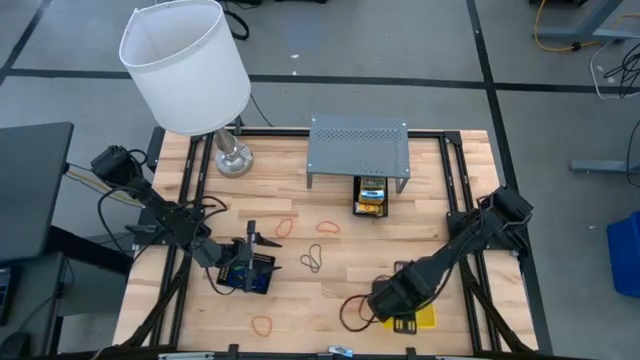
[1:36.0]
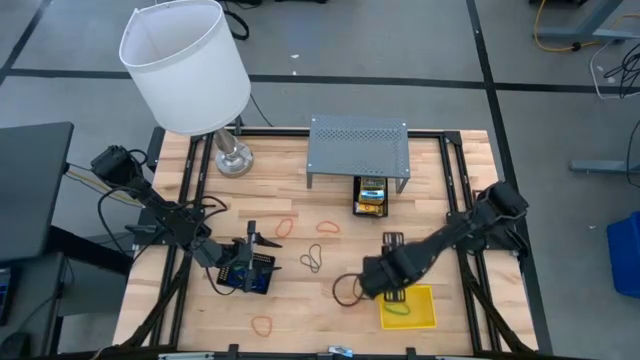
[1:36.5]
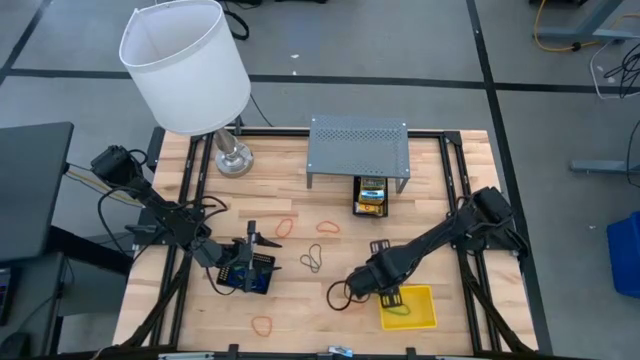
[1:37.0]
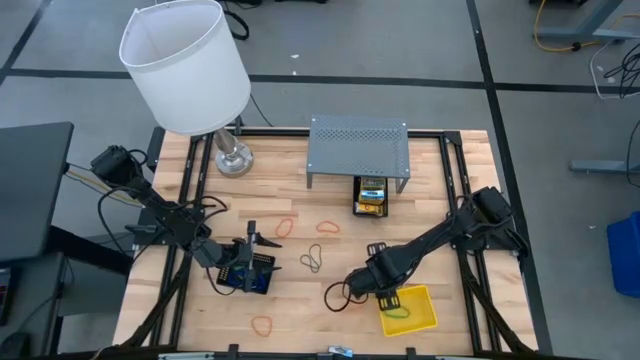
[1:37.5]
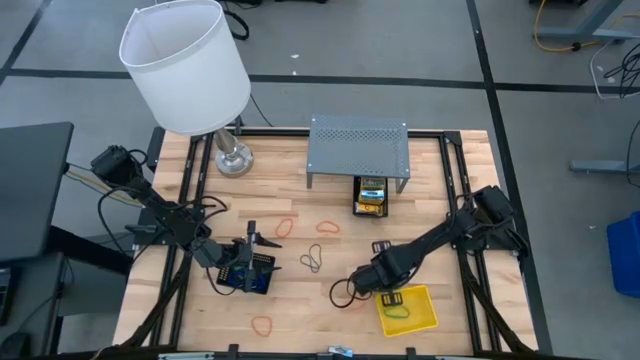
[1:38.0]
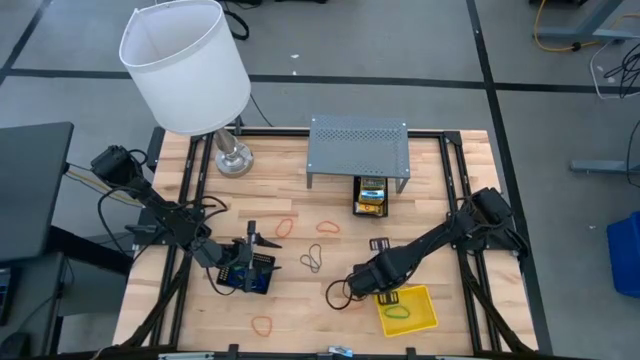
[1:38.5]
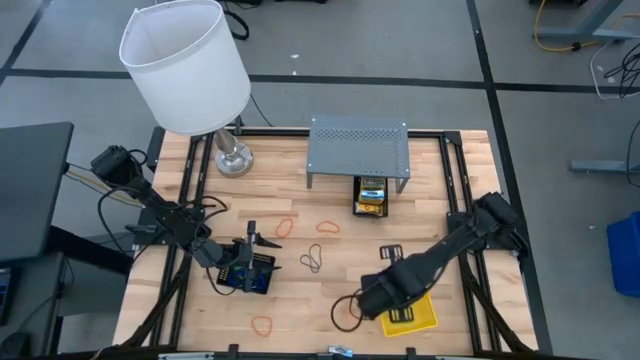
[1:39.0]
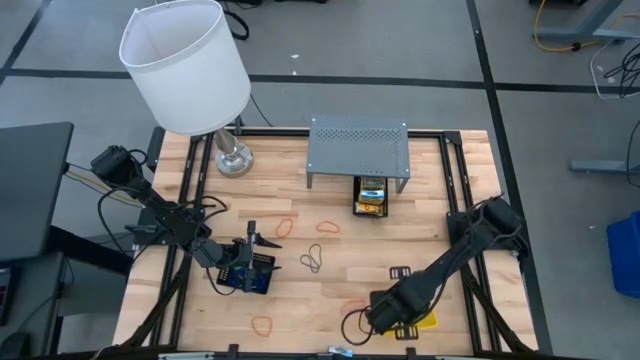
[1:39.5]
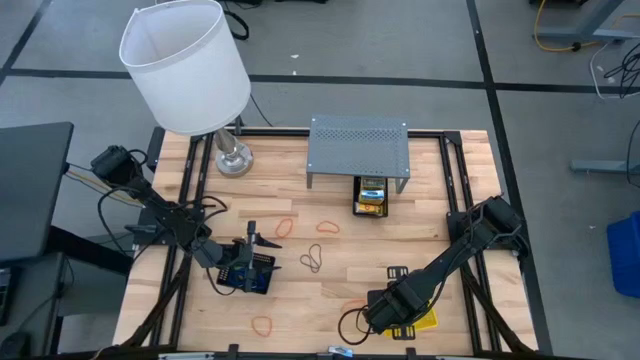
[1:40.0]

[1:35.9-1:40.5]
Task: Pick & Place Office Desk Supplies
Put the brown rubber band into the yellow bin

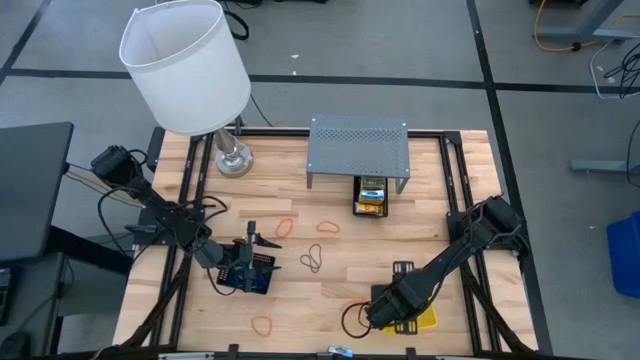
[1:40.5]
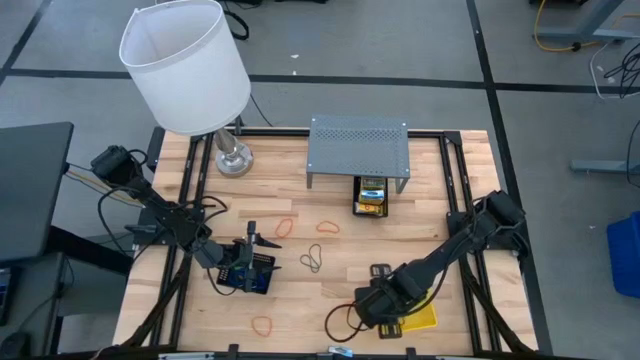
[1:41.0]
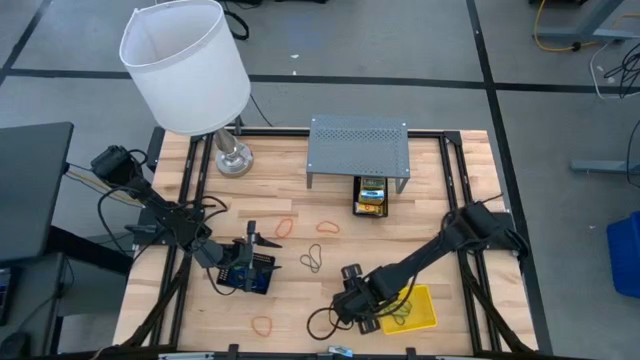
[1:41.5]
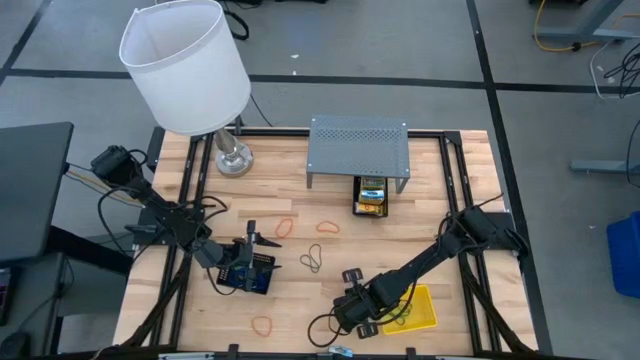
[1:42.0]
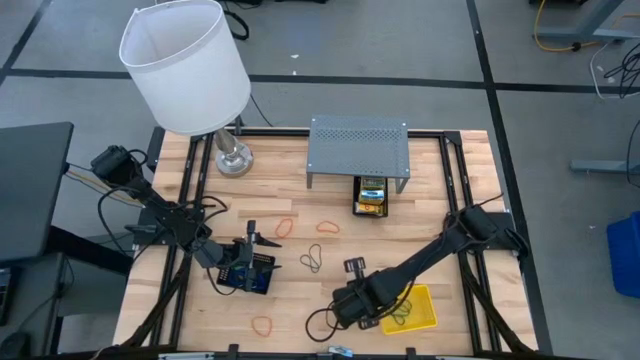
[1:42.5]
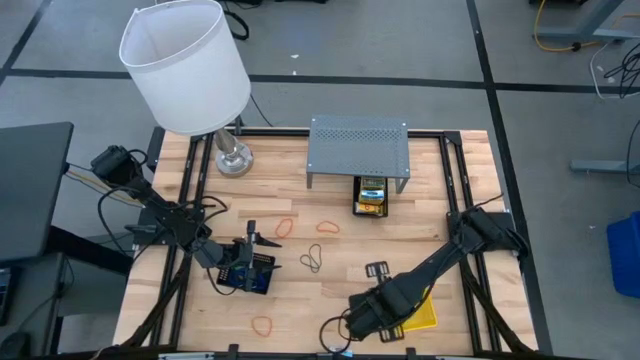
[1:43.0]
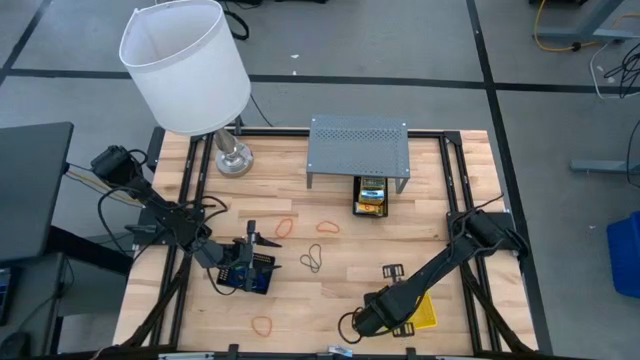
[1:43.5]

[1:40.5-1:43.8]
Put the orange rubber band into the yellow bin

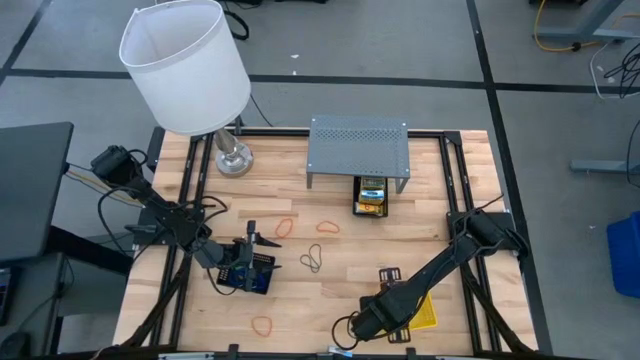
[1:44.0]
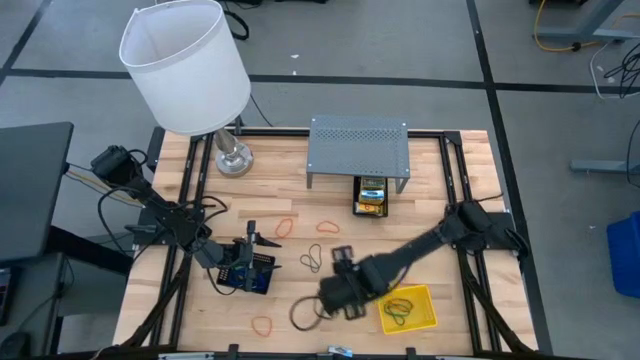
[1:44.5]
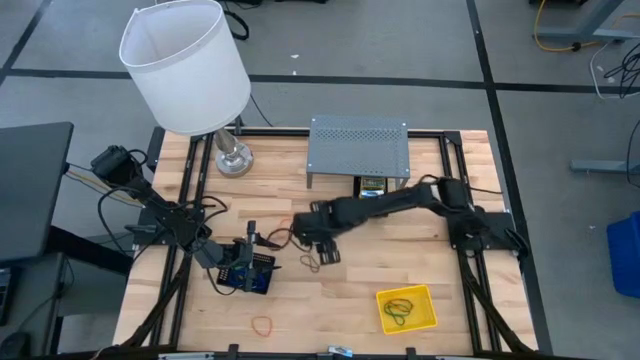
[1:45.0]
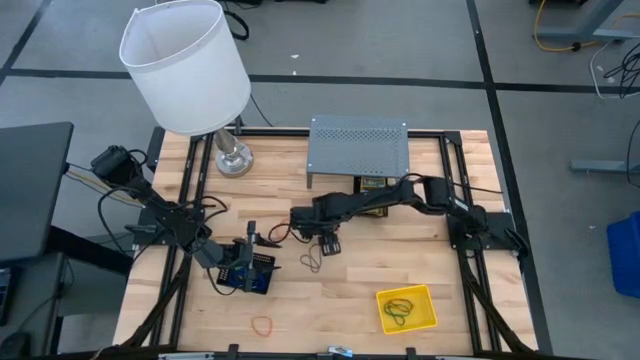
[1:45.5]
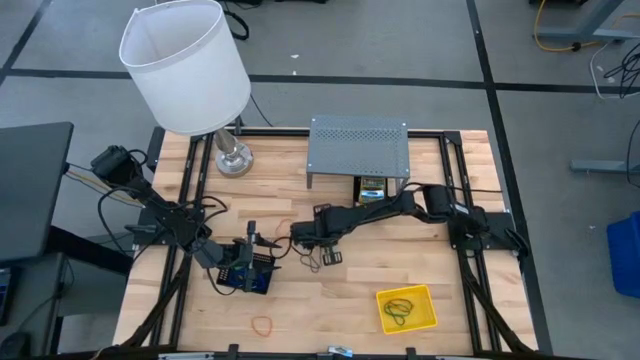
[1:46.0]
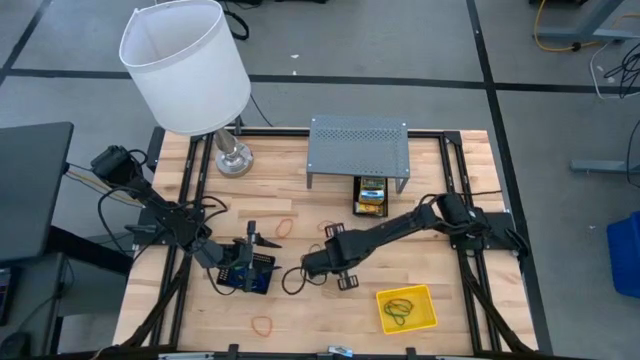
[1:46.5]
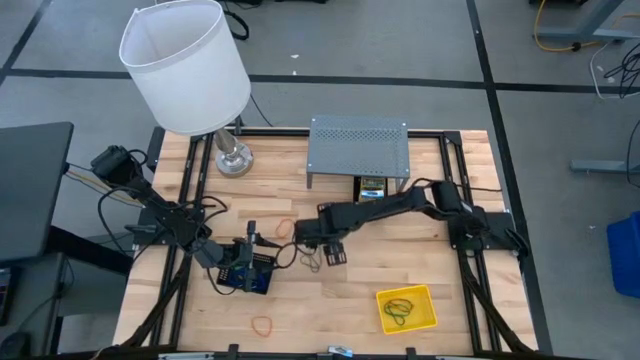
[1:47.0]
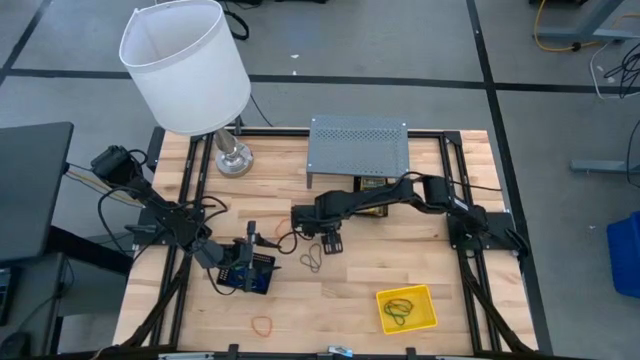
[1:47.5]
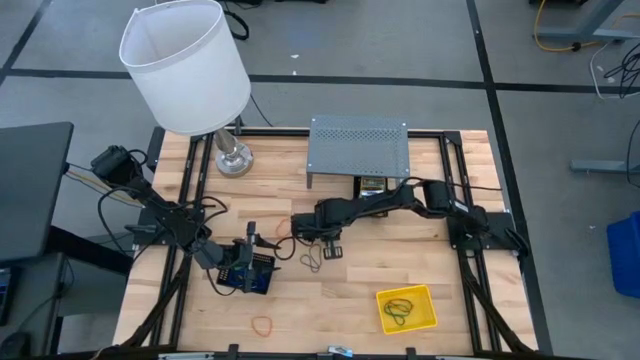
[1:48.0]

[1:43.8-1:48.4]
Put the orange rubber band into the yellow bin

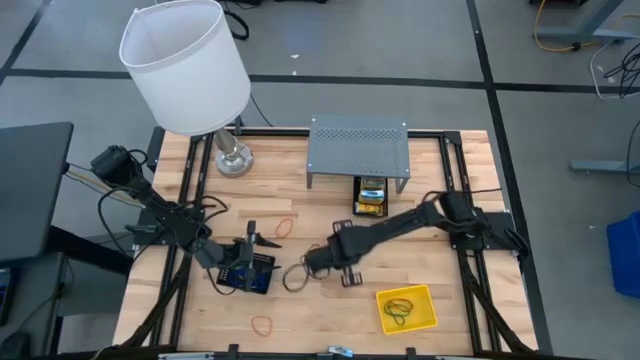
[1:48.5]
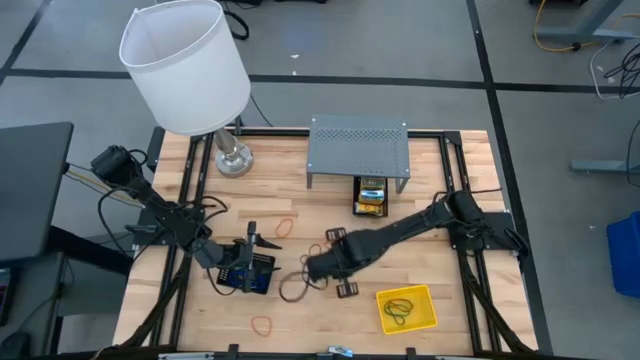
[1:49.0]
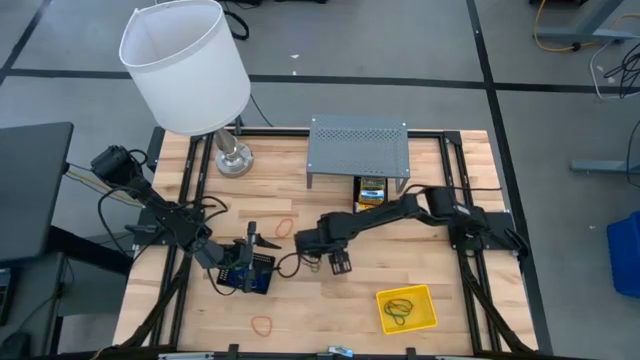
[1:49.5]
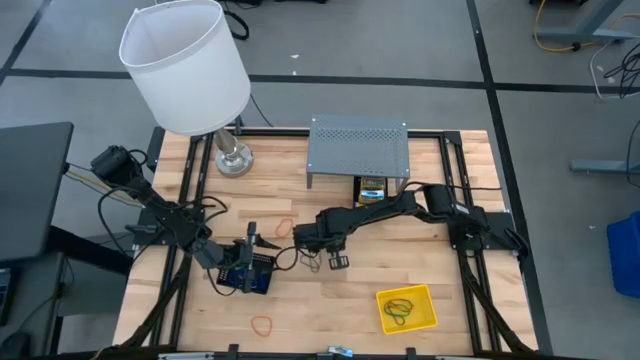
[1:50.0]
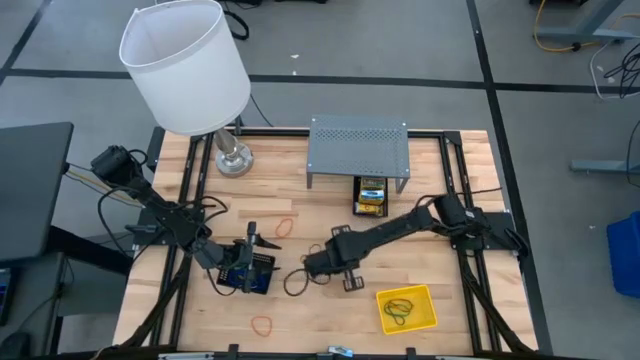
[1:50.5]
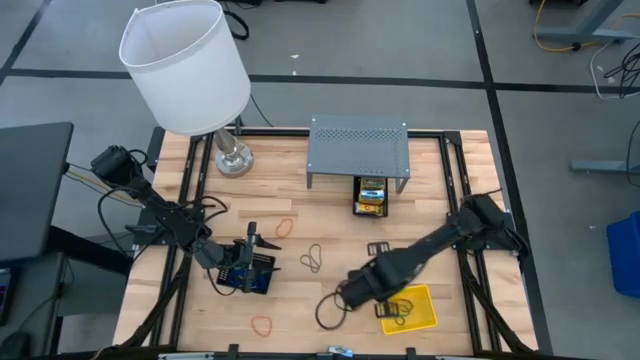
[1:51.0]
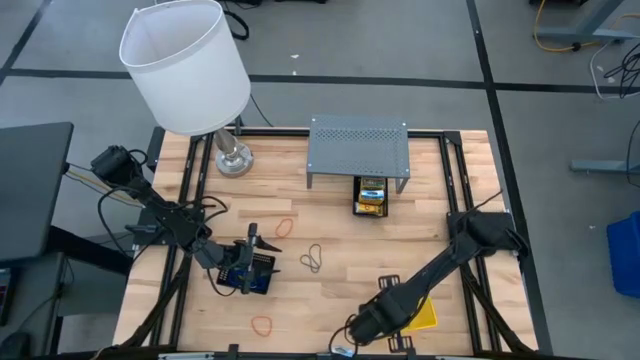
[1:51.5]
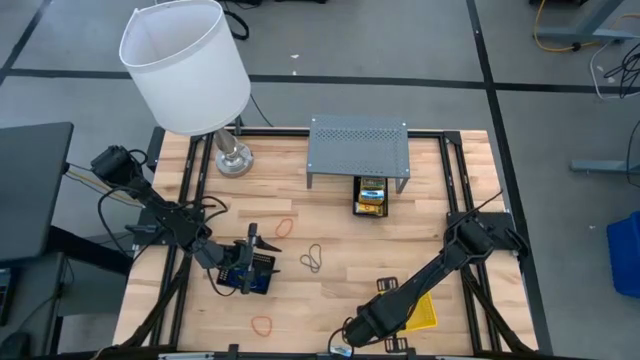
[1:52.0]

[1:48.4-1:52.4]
Put the orange rubber band into the yellow bin

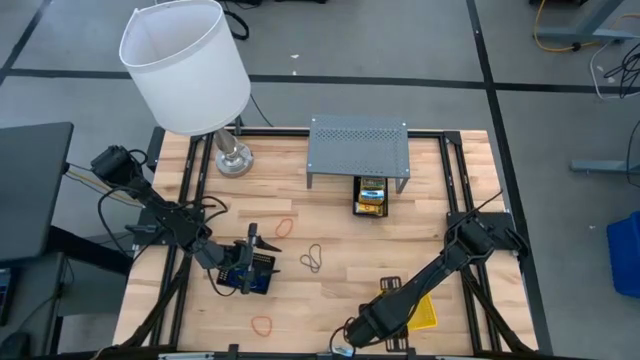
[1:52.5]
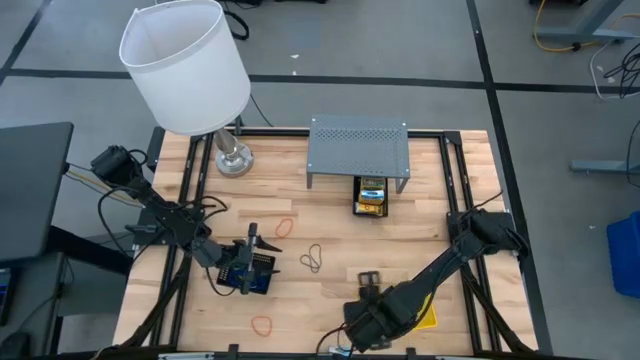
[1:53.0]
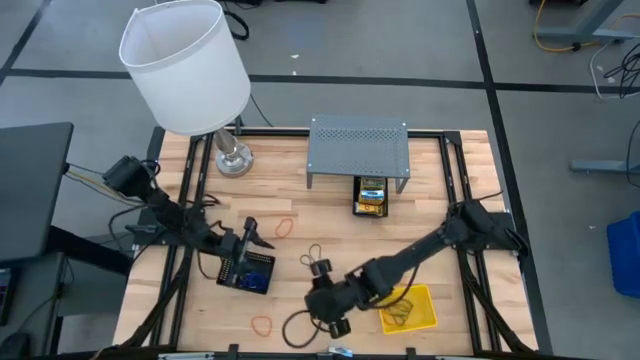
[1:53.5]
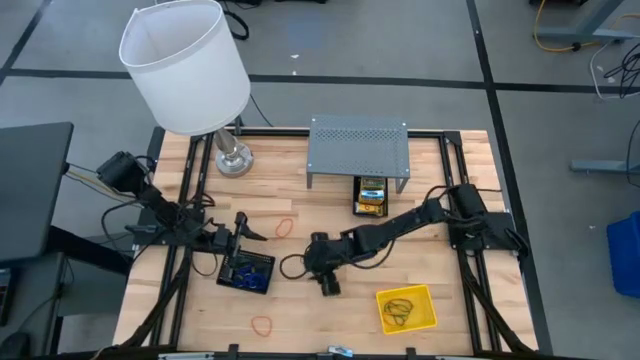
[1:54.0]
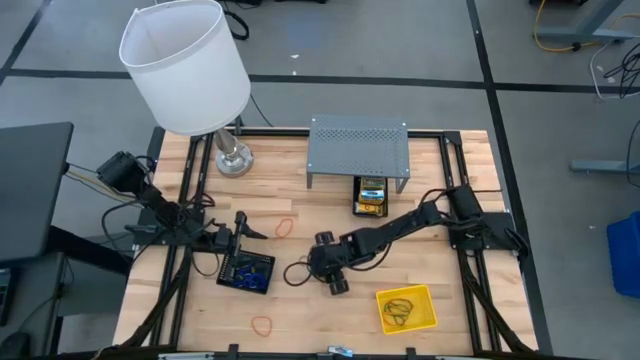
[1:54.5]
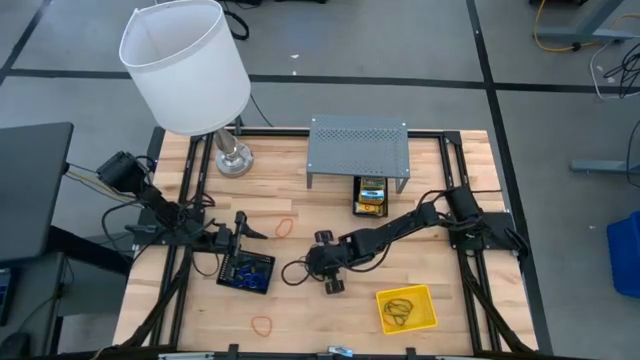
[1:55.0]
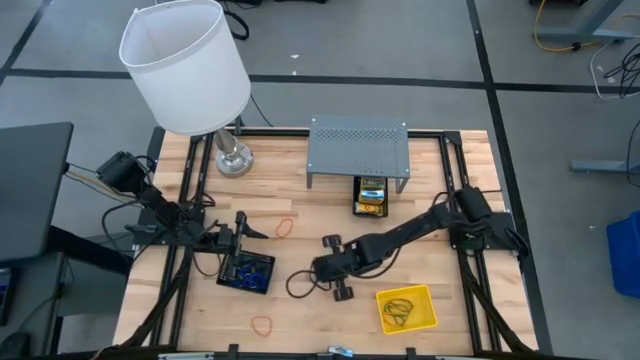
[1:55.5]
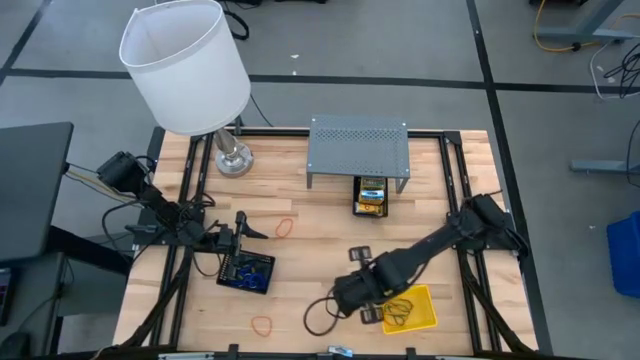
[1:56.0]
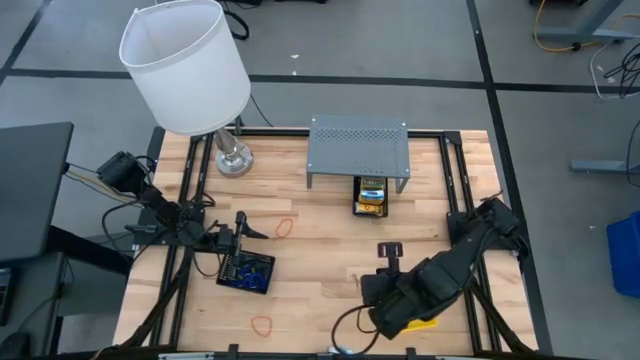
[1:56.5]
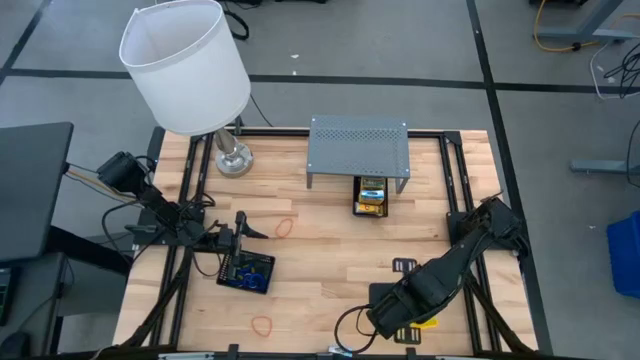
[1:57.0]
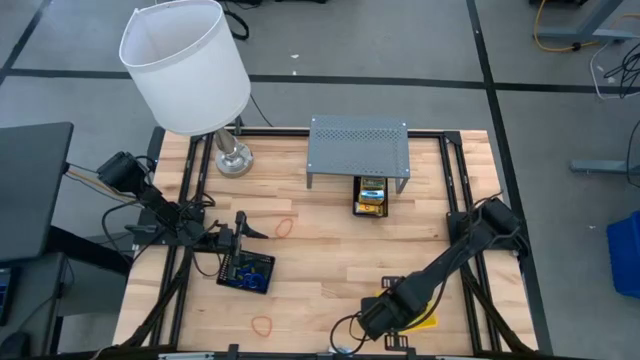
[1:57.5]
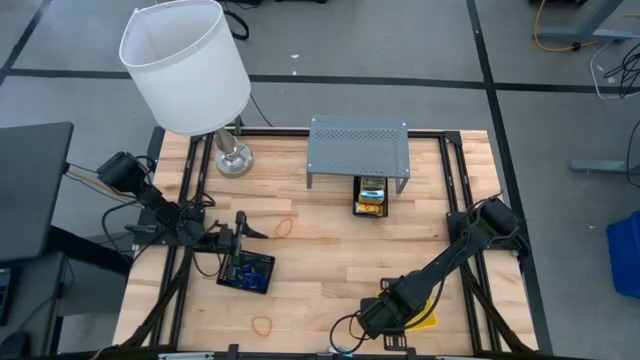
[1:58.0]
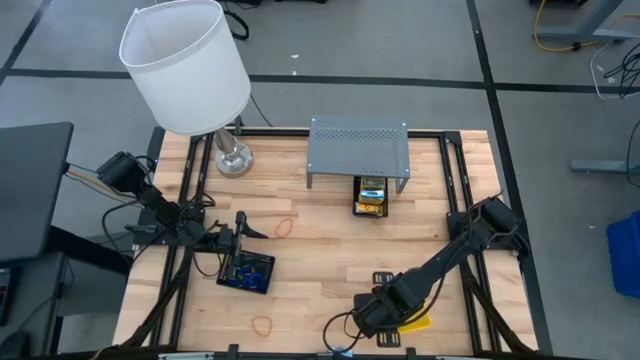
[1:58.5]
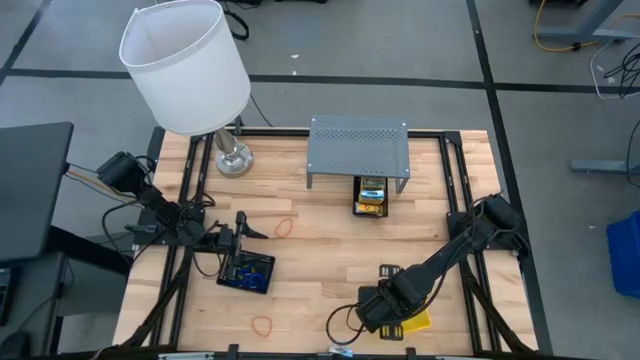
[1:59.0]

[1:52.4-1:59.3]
Put the brown rubber band into the yellow bin
